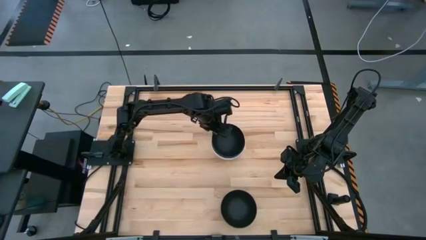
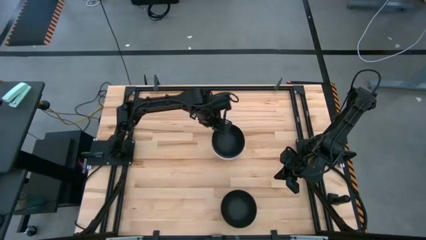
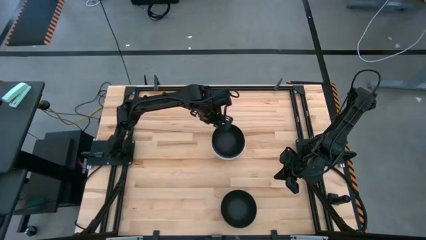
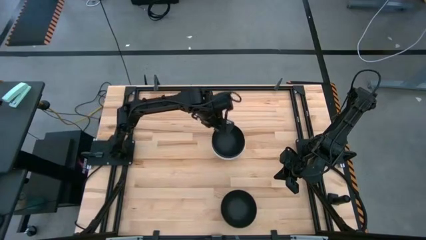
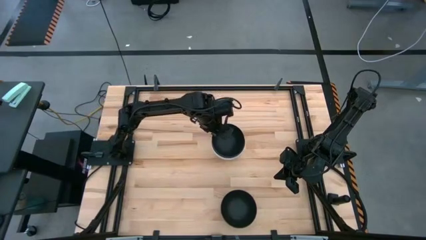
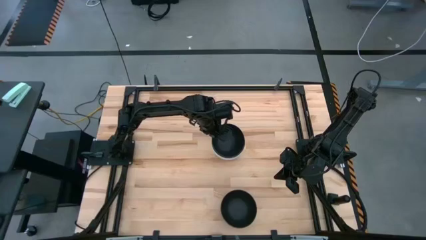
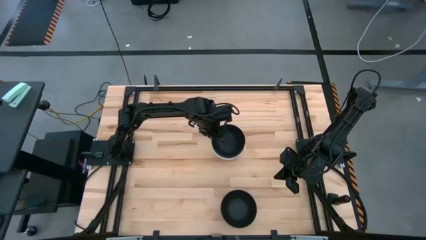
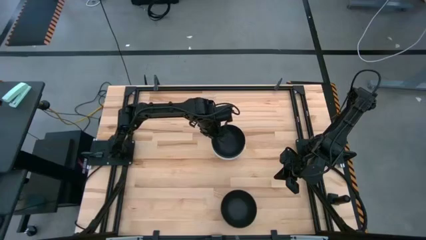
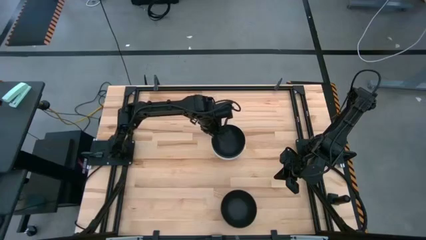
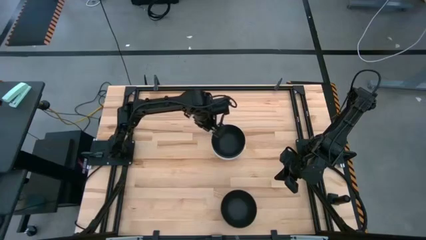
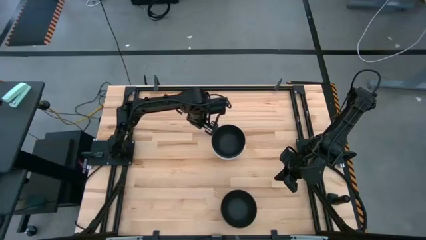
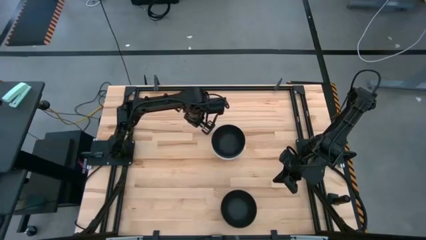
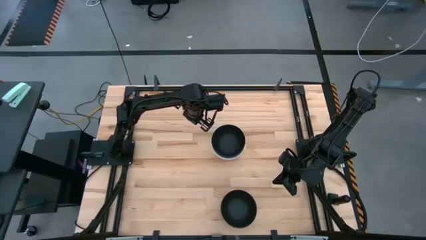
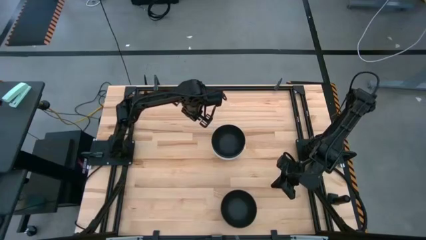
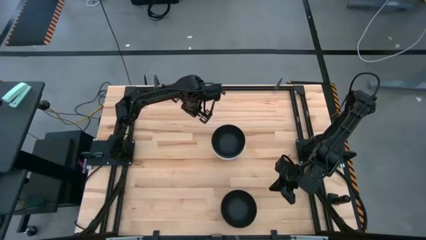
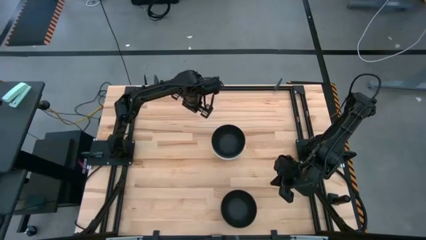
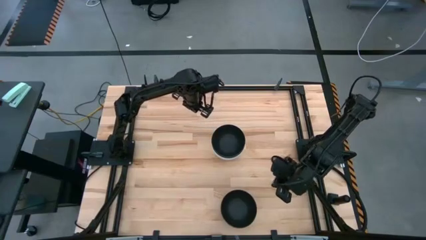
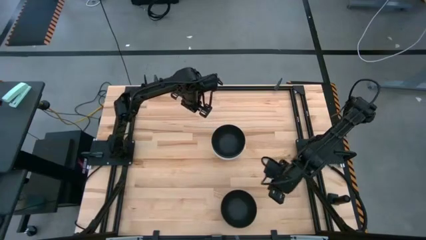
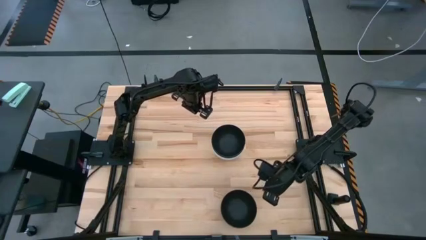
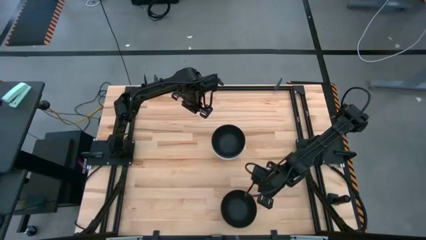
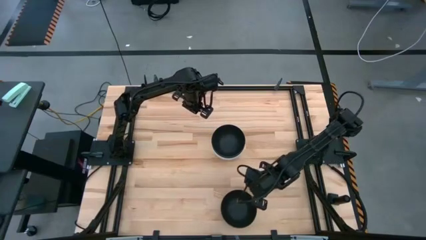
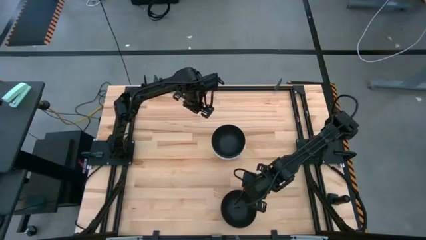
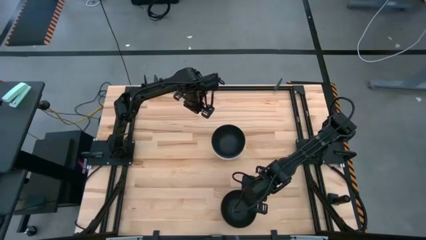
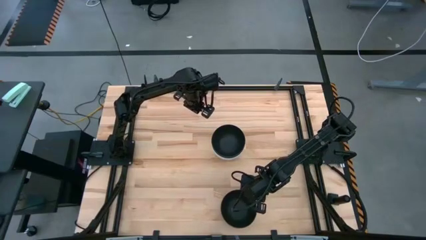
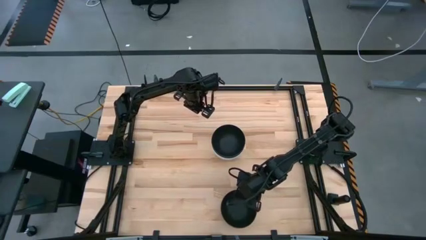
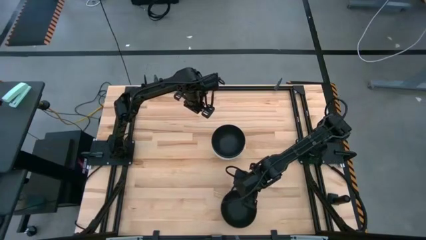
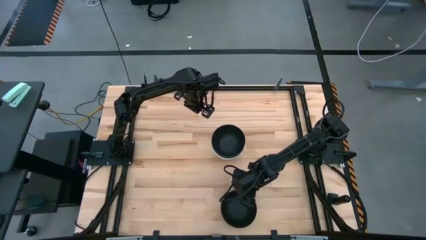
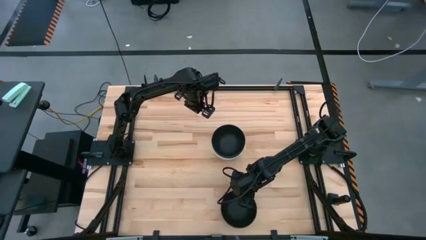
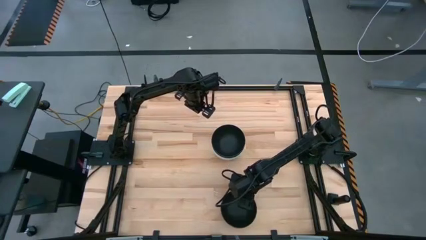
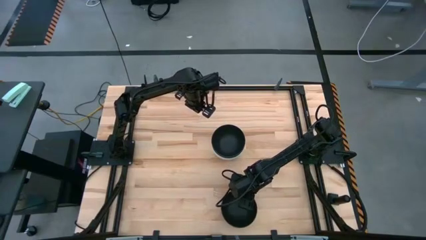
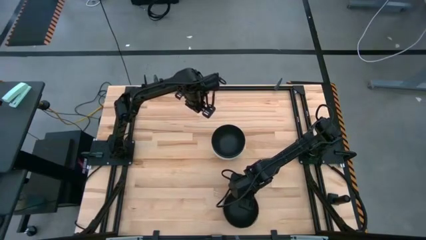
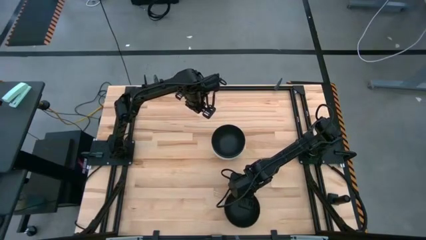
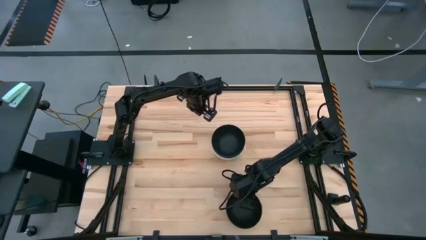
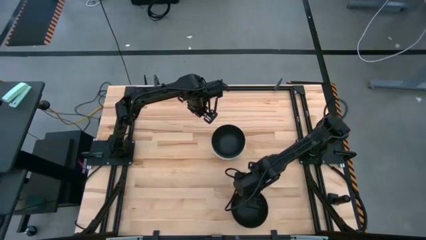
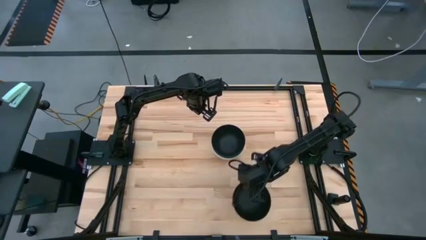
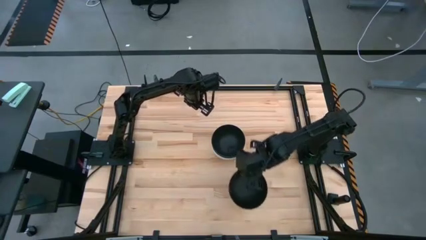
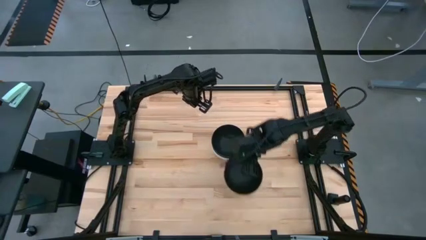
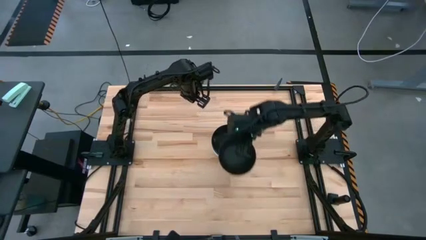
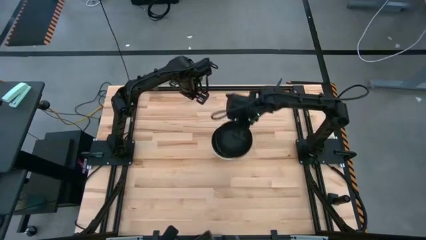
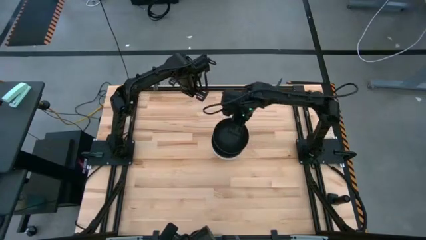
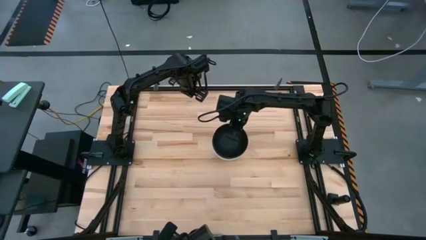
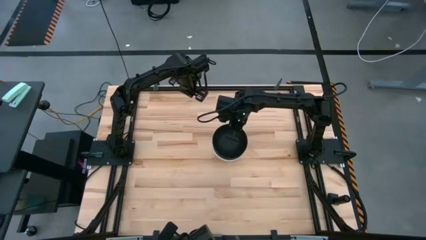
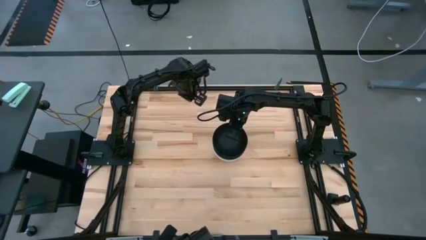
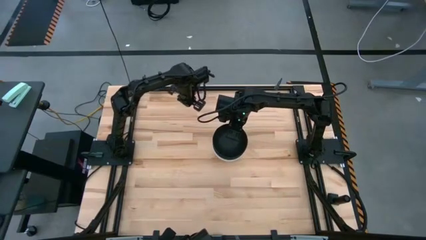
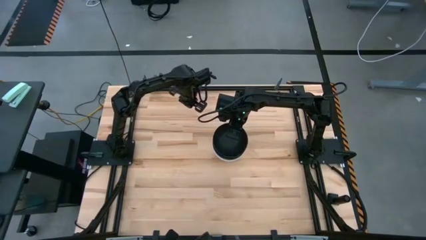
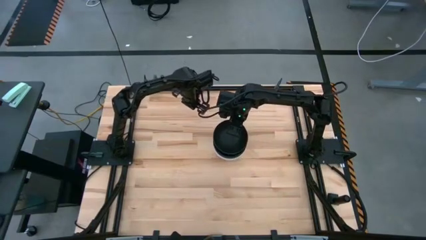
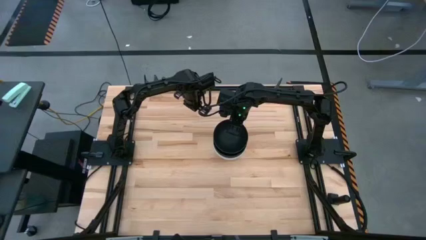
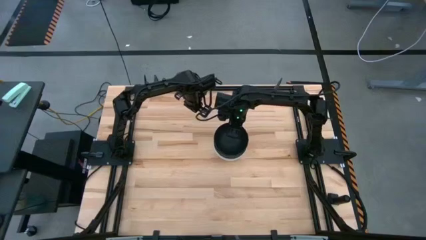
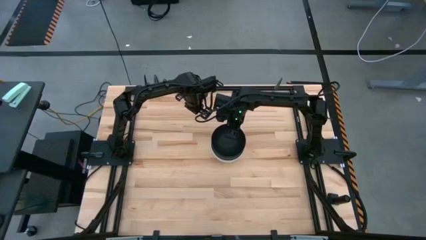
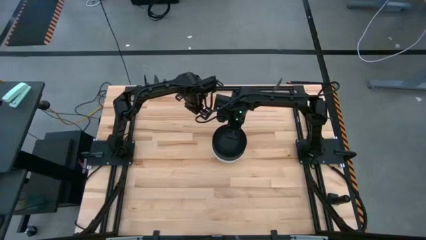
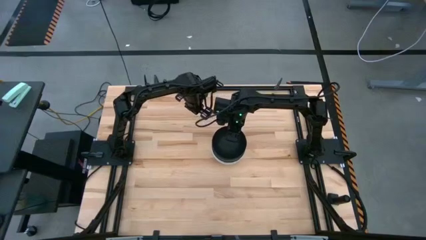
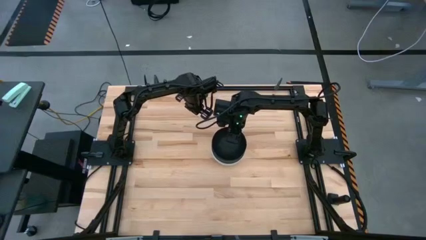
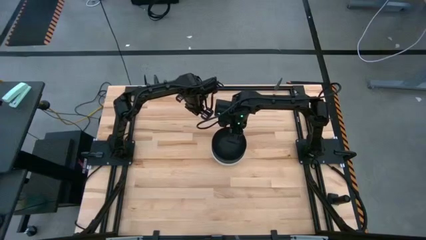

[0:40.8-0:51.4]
Task: Nest bowls inside each other
Stack the black bowl on the black bowl

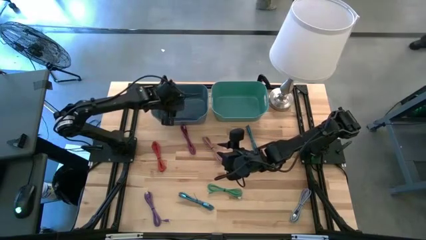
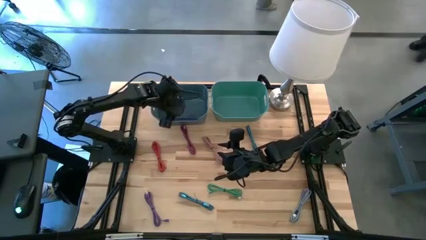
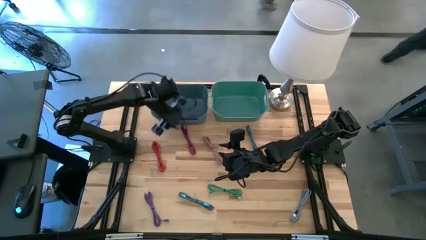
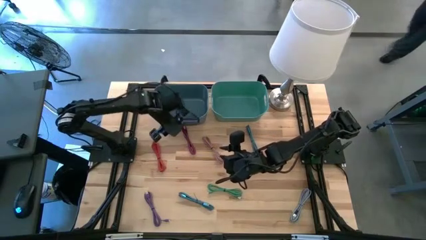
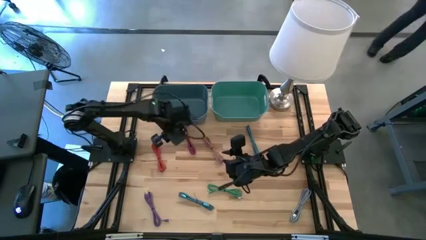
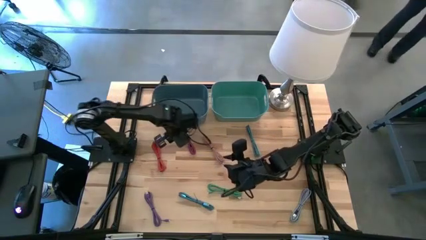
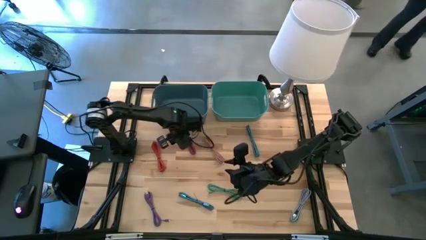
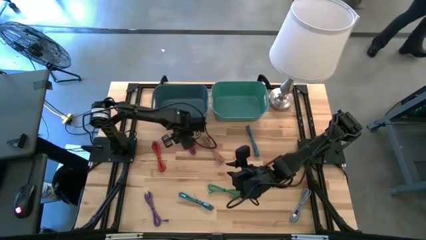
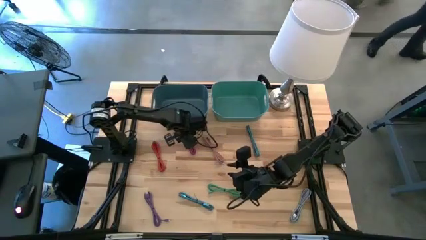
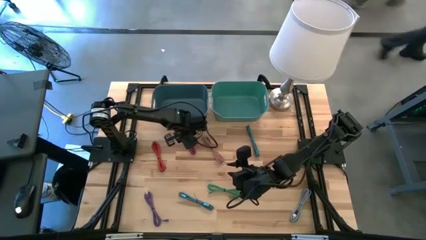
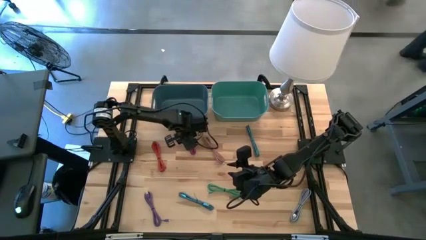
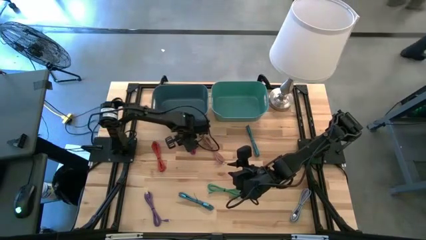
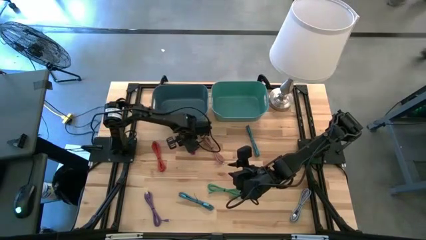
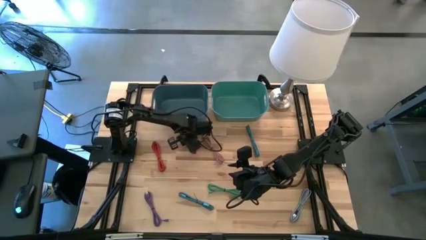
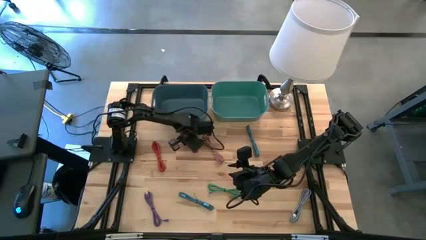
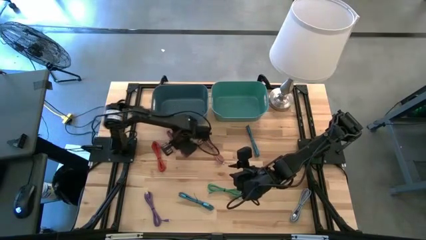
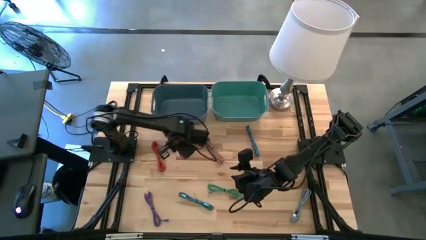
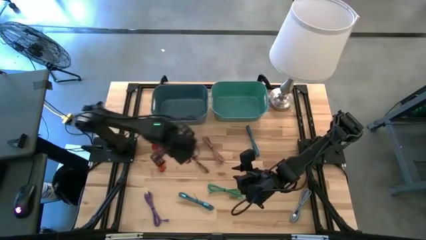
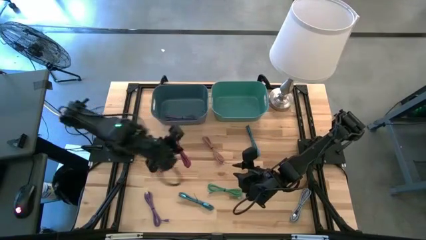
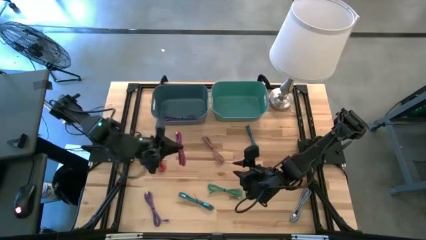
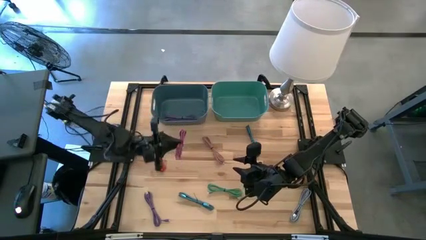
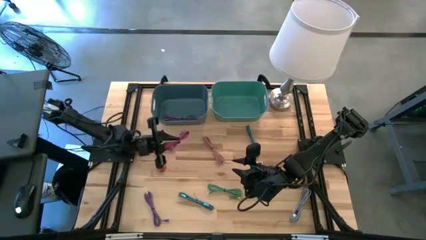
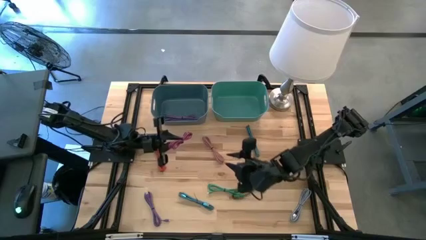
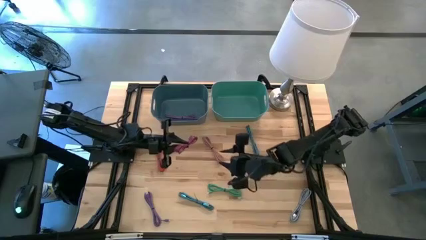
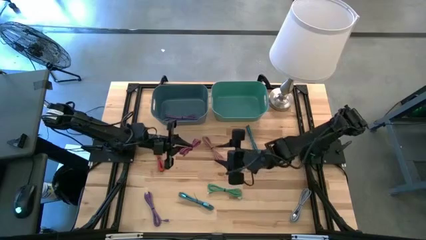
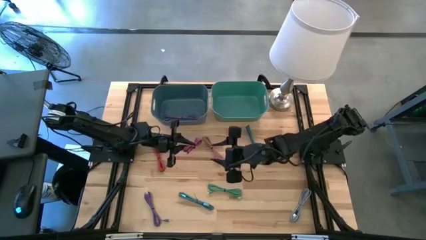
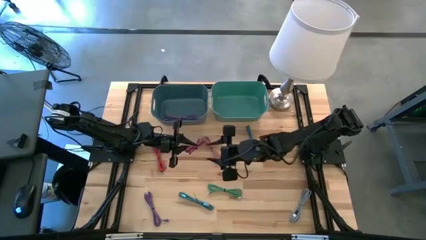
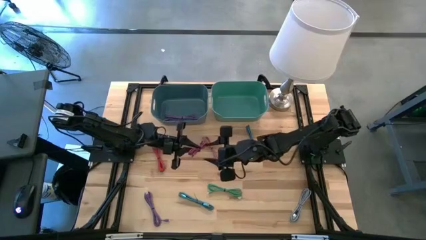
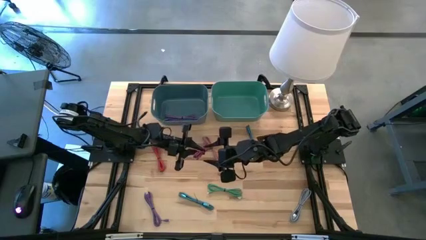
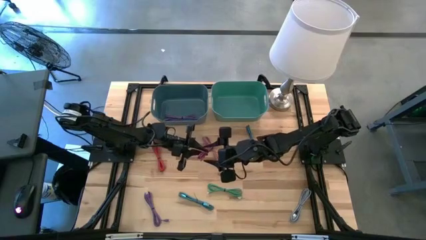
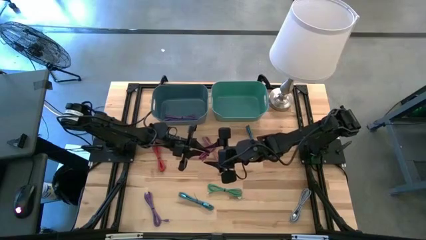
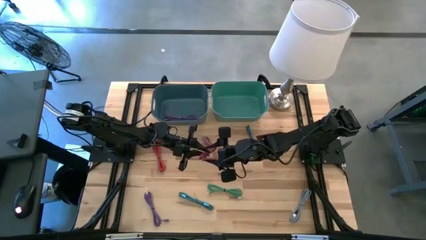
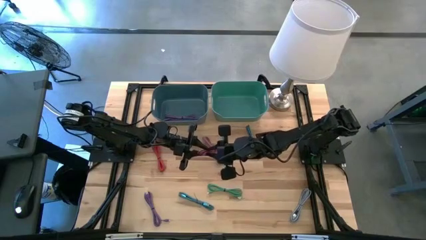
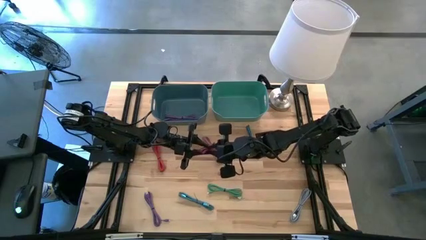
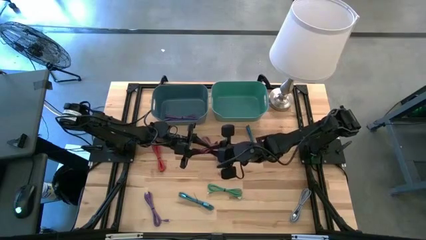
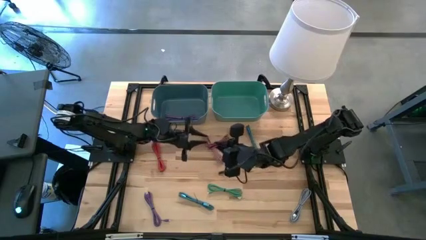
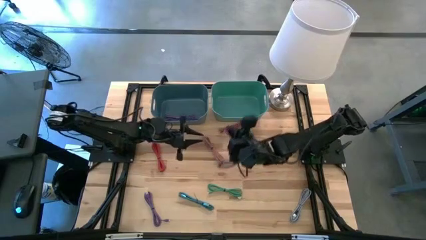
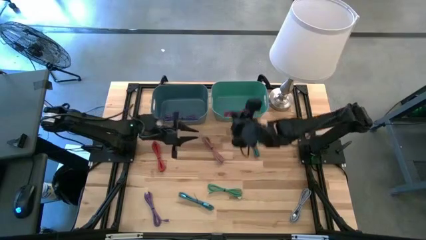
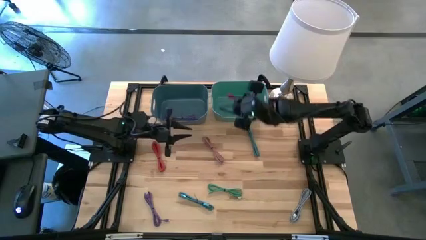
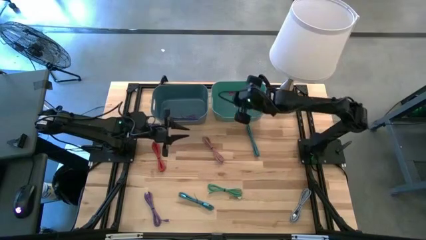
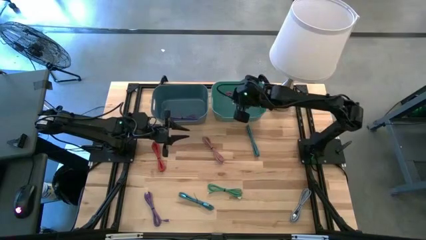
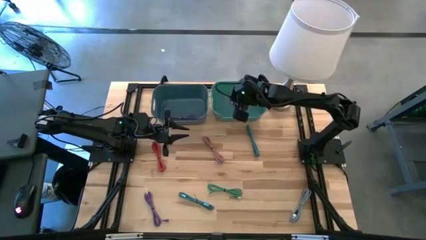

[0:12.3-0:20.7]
Task: Pick & Place USB Port
Put the pink usb cable into the green bin
